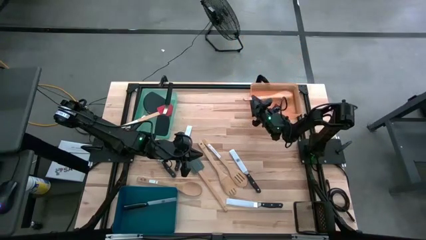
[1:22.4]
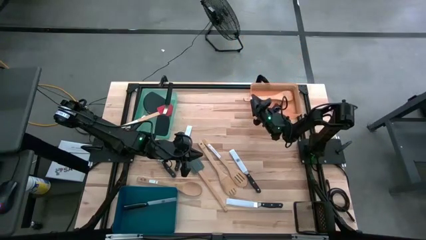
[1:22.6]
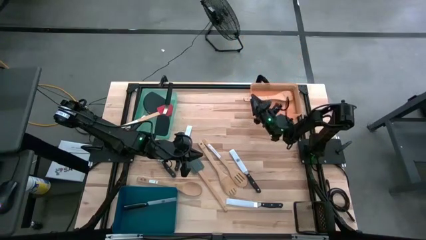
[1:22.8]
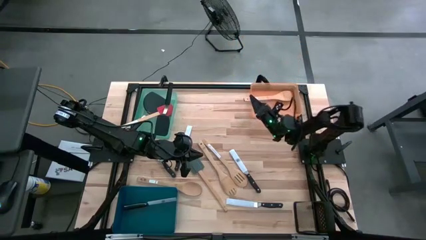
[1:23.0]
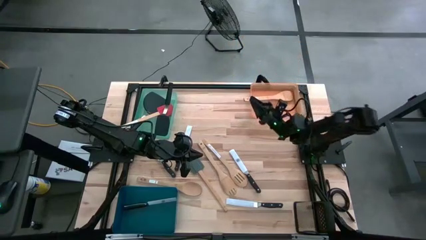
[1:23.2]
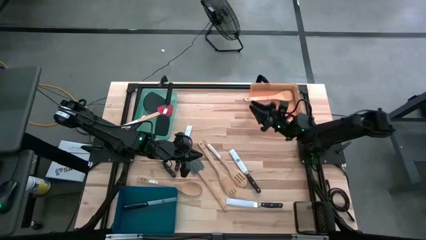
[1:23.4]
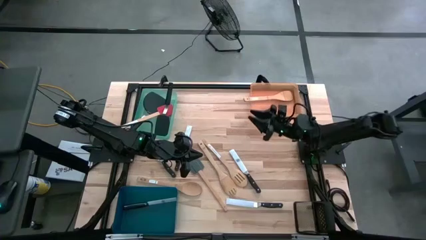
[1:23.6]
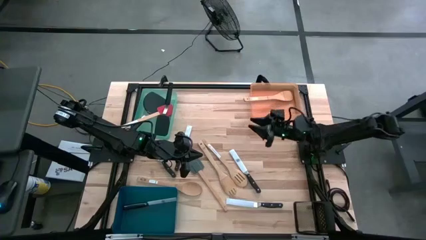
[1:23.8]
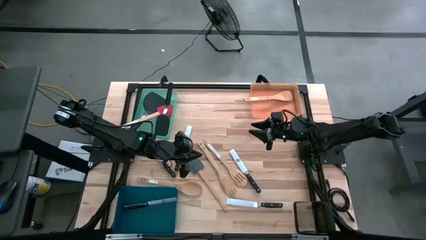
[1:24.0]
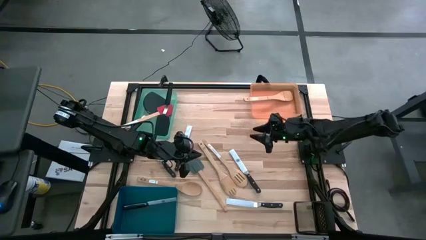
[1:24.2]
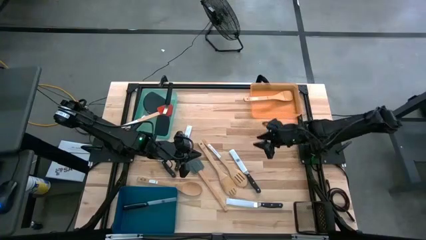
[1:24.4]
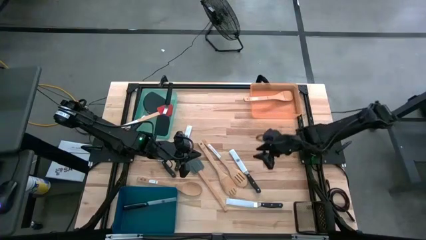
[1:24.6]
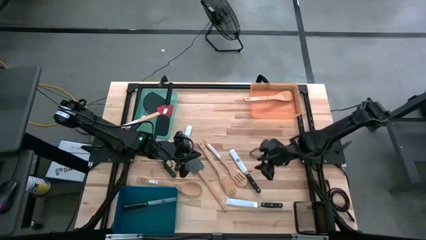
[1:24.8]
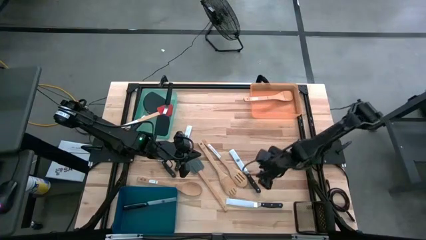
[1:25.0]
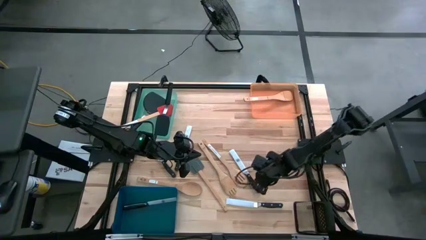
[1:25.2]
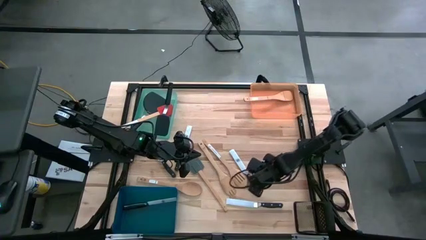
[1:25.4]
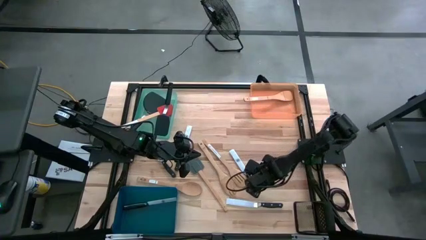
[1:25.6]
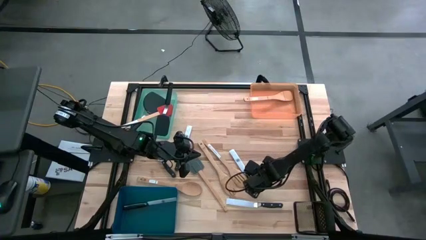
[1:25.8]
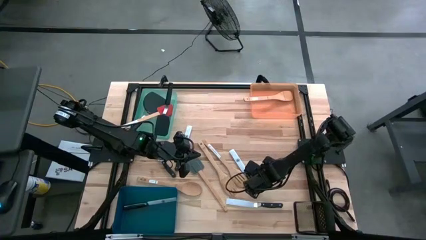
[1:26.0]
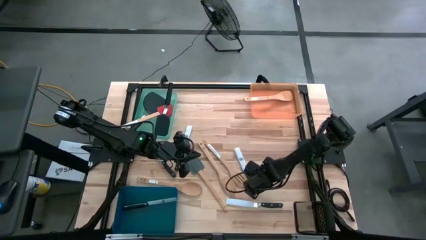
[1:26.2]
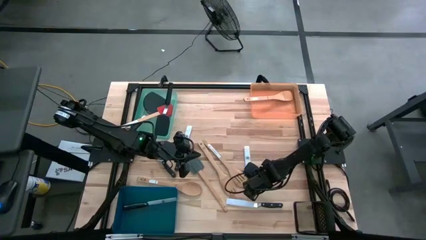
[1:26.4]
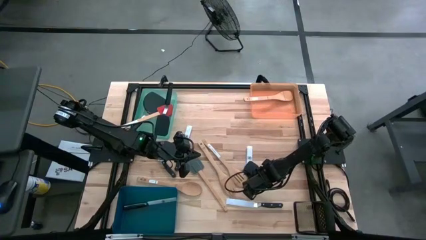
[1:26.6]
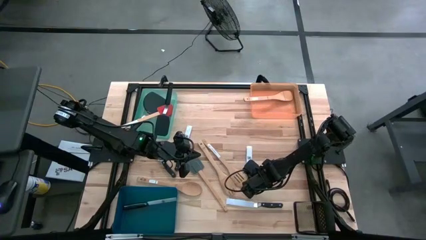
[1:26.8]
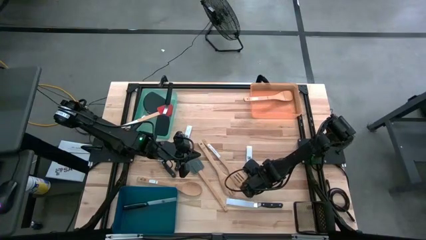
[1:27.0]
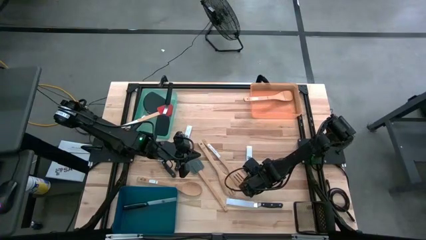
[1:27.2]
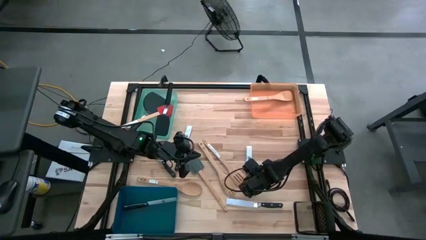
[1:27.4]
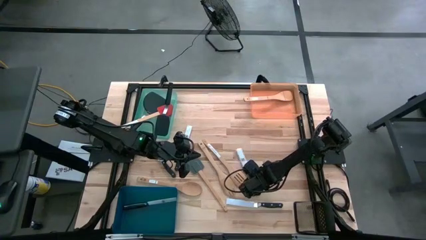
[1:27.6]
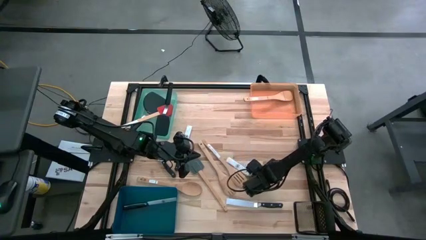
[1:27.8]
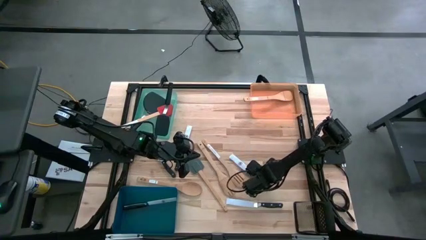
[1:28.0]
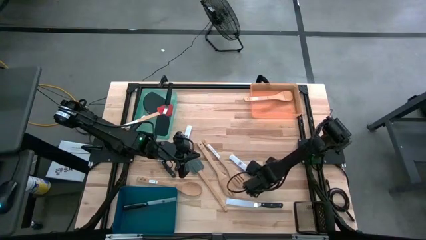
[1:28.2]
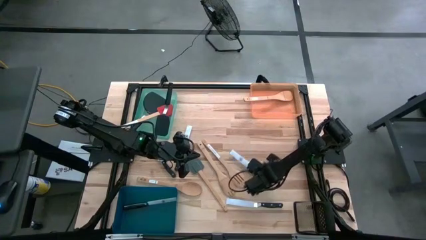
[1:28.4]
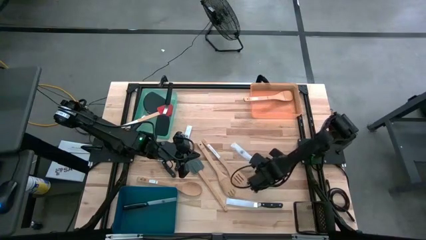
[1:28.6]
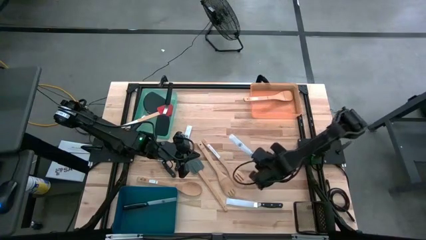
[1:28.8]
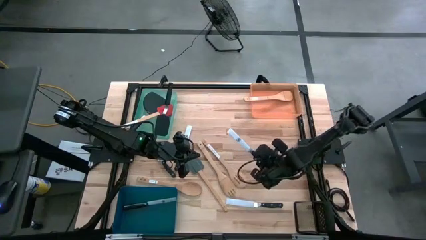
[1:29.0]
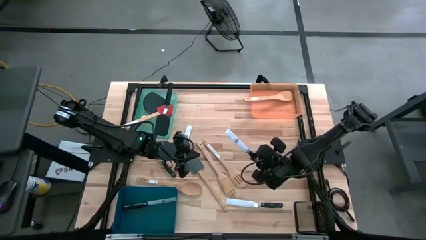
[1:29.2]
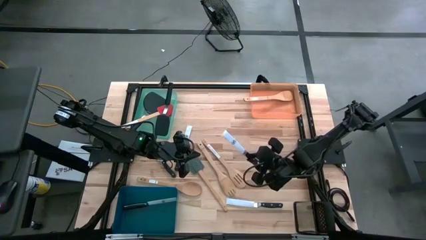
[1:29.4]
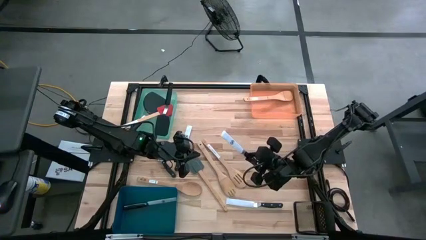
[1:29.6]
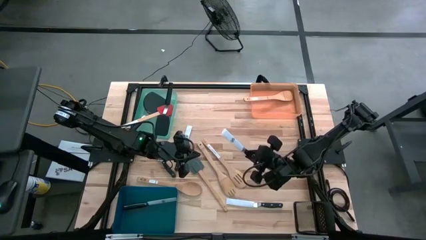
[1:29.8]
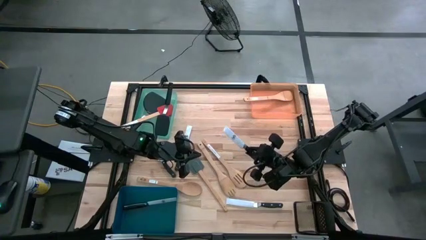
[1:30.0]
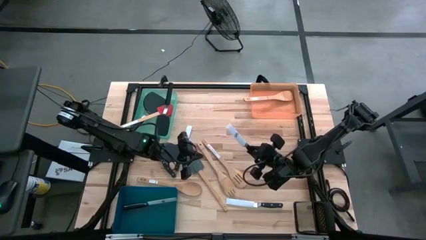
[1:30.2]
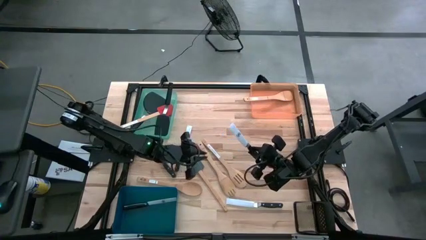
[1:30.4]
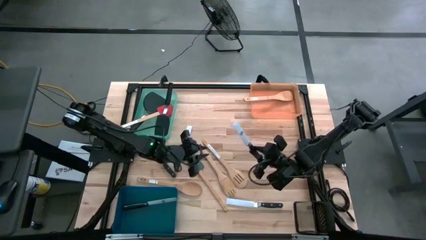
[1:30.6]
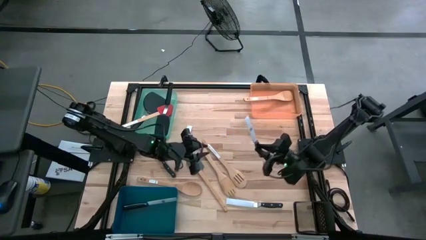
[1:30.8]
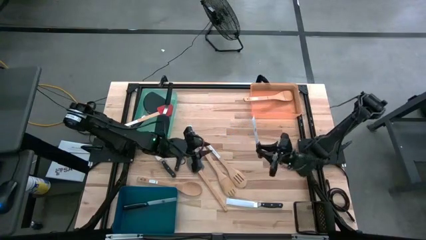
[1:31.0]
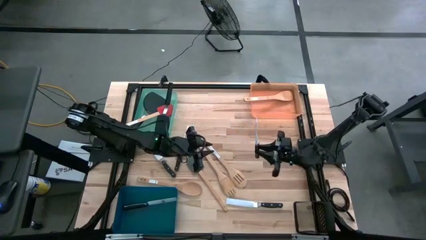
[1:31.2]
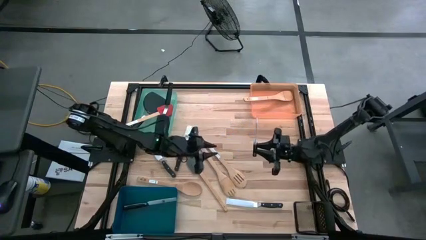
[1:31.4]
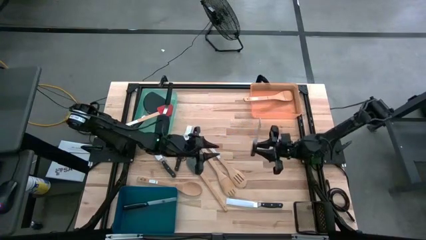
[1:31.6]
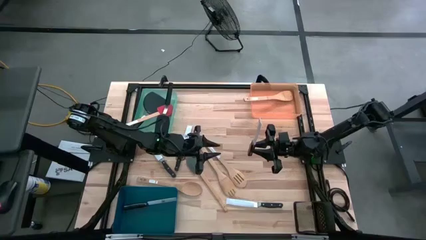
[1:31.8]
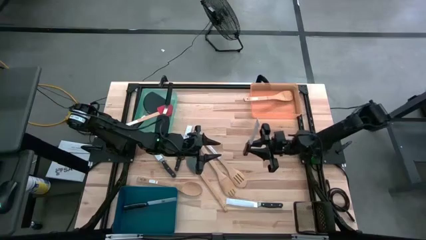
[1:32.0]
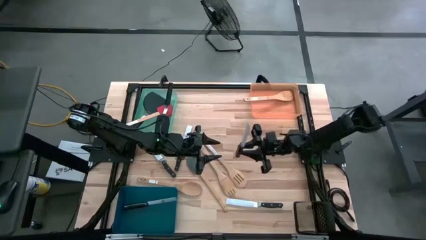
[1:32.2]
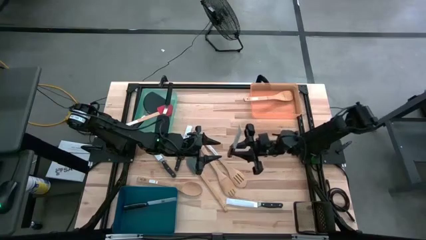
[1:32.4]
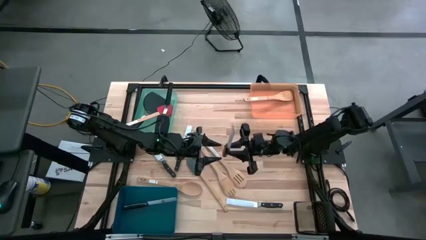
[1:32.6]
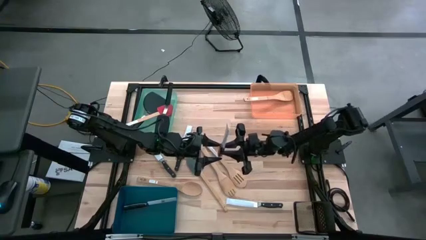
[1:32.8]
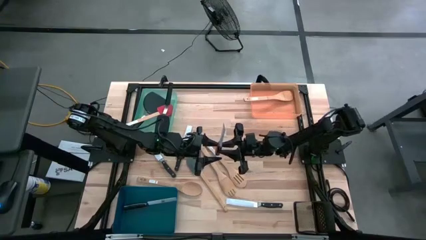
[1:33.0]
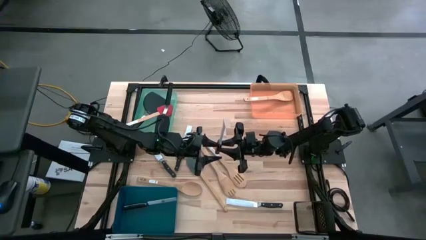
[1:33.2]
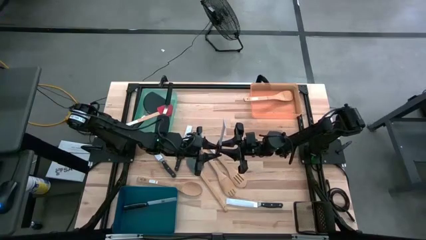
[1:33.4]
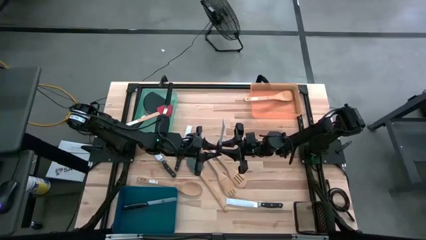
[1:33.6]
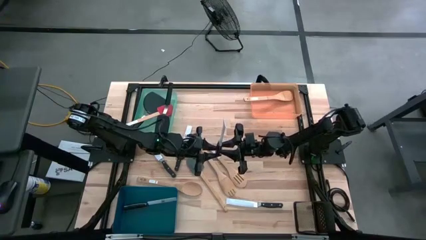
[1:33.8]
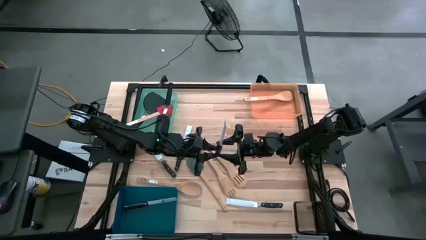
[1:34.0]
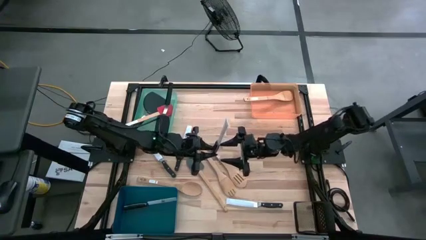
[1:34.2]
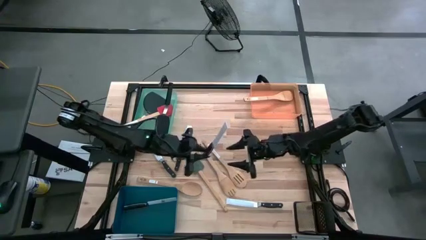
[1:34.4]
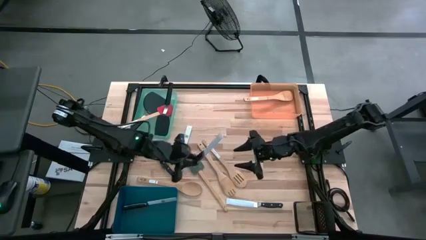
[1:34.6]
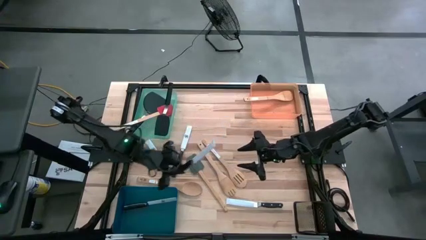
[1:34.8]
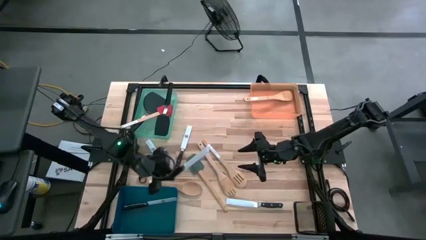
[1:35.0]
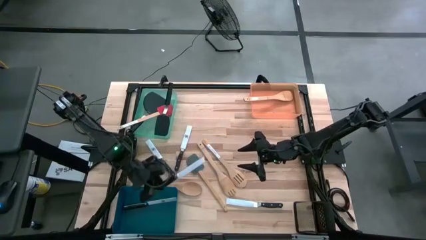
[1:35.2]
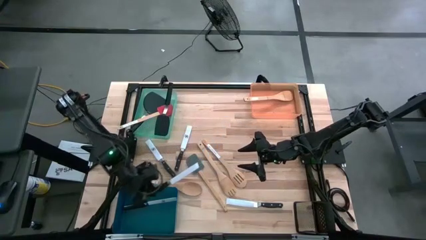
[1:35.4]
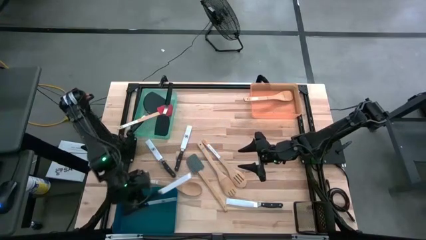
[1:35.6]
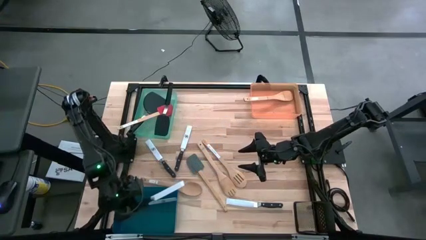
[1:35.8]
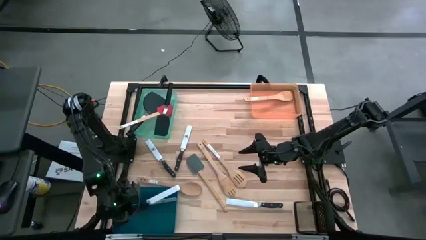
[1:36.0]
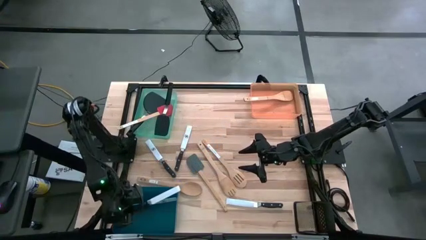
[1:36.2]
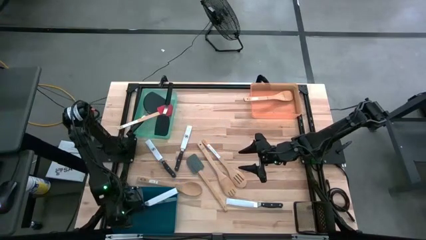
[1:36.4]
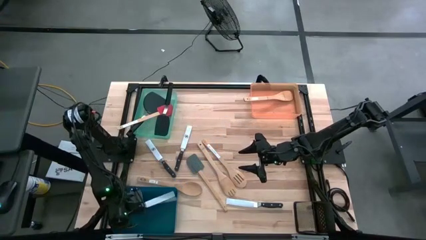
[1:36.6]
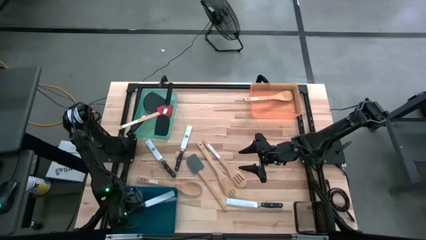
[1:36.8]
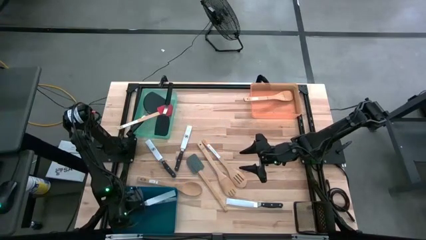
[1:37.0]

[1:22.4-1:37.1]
Task: Pick & Place Kitchen Items
Put the black knife into the blue bin
